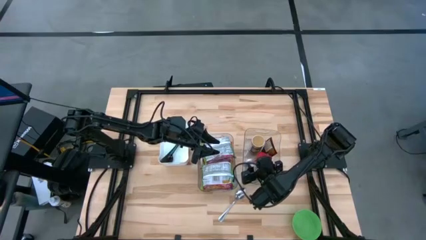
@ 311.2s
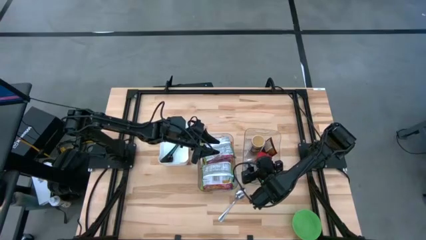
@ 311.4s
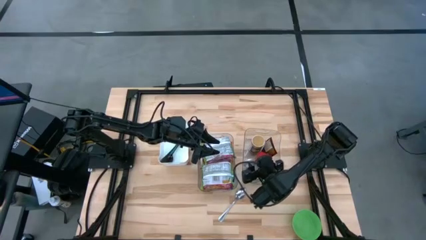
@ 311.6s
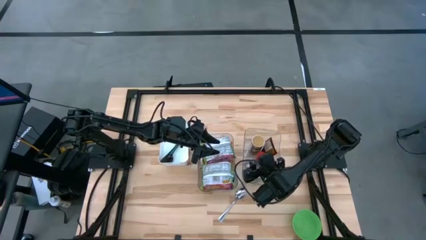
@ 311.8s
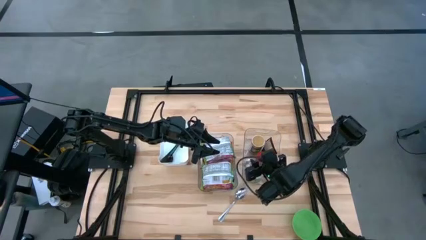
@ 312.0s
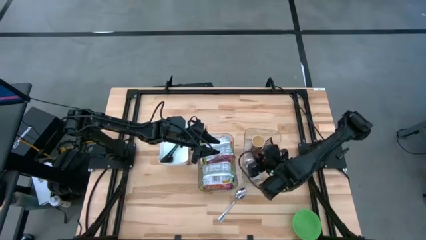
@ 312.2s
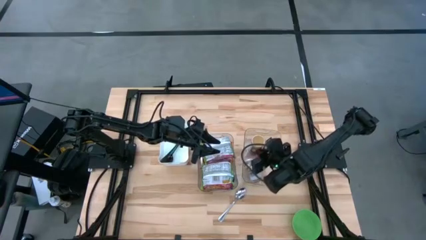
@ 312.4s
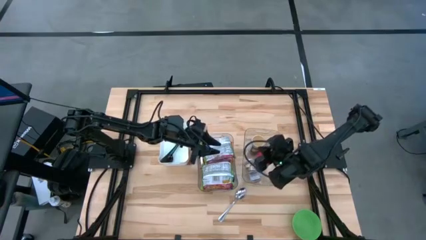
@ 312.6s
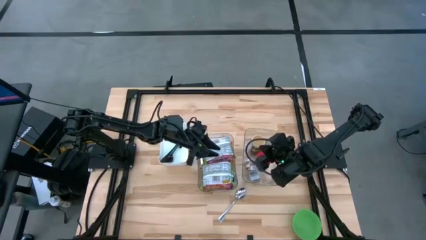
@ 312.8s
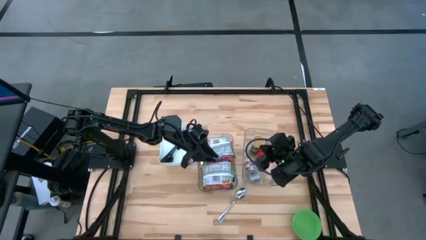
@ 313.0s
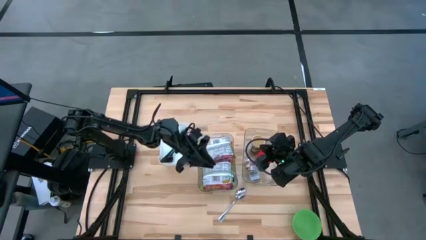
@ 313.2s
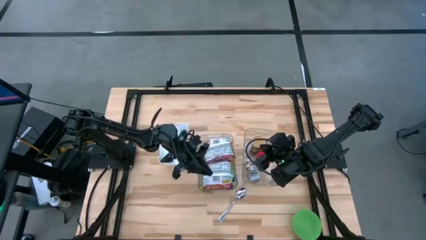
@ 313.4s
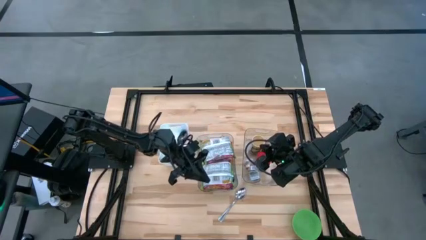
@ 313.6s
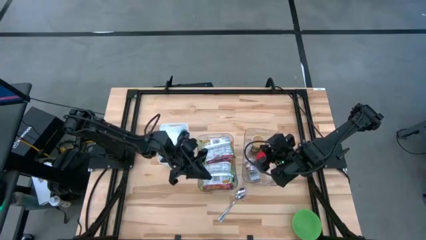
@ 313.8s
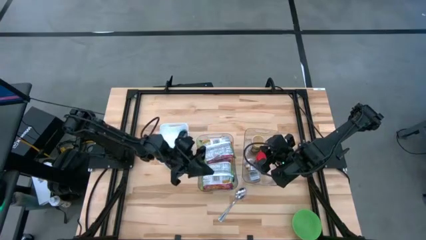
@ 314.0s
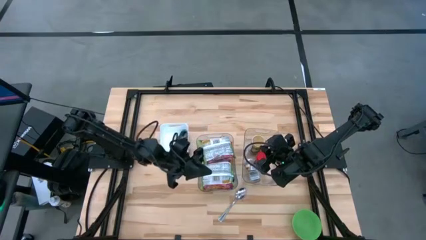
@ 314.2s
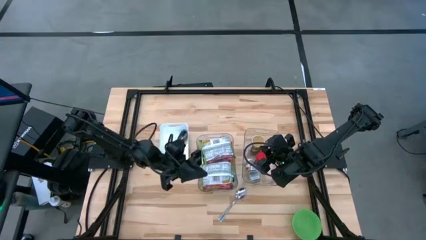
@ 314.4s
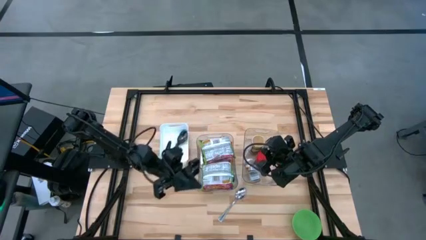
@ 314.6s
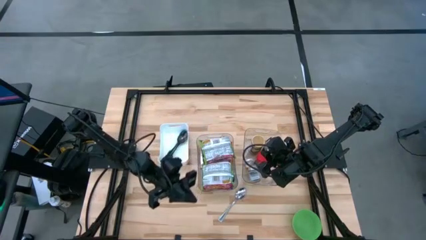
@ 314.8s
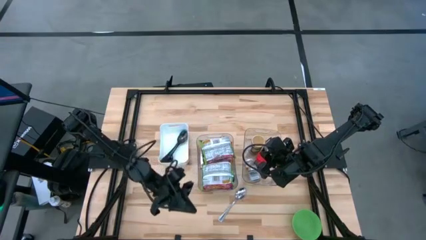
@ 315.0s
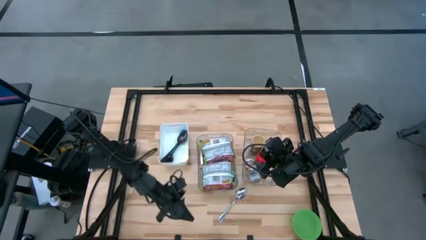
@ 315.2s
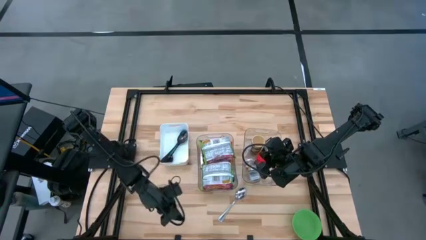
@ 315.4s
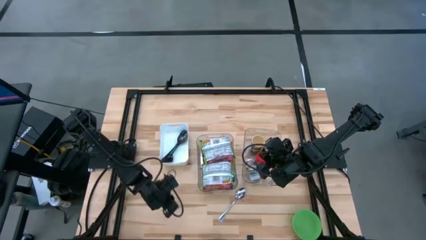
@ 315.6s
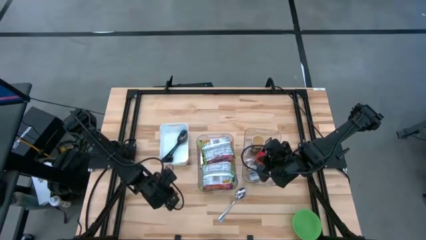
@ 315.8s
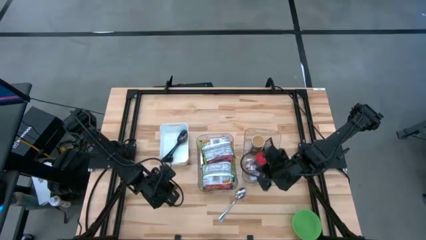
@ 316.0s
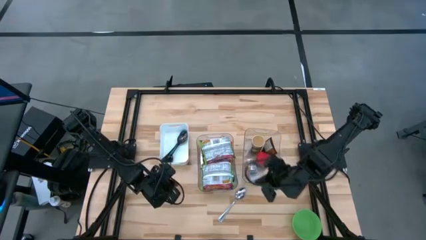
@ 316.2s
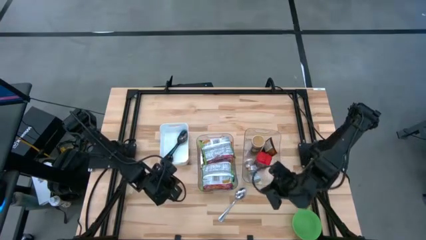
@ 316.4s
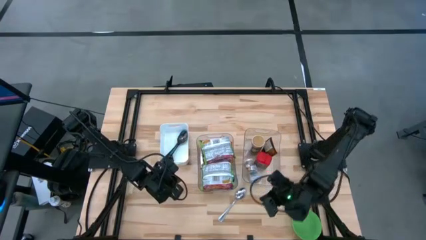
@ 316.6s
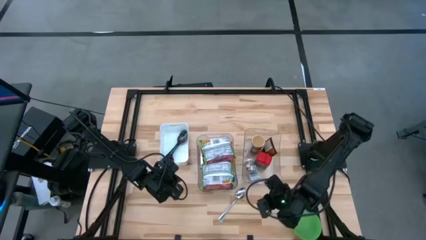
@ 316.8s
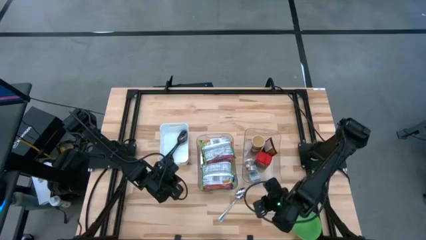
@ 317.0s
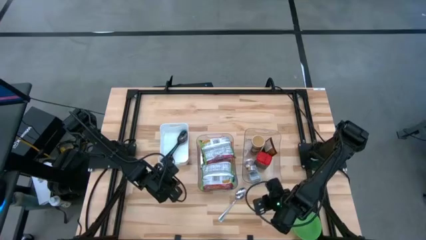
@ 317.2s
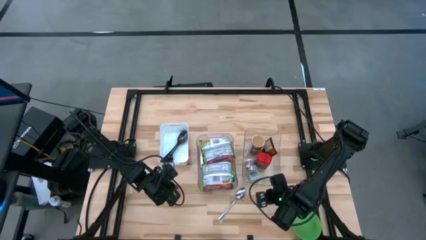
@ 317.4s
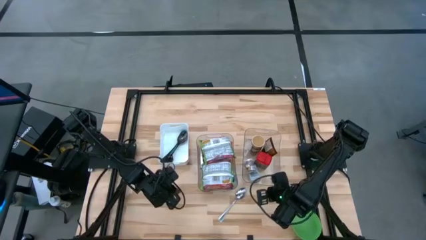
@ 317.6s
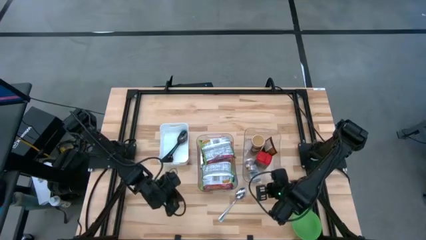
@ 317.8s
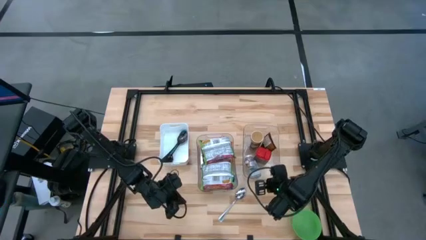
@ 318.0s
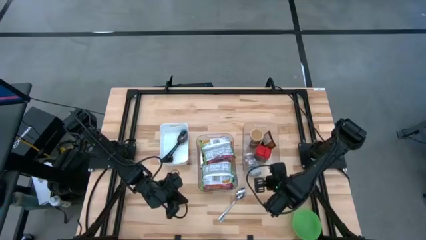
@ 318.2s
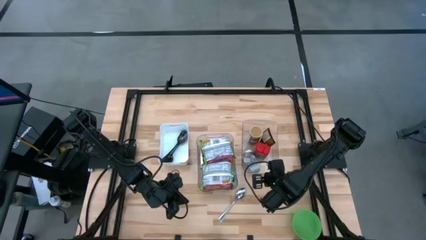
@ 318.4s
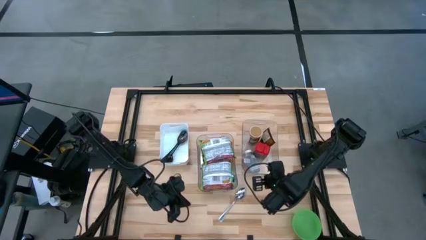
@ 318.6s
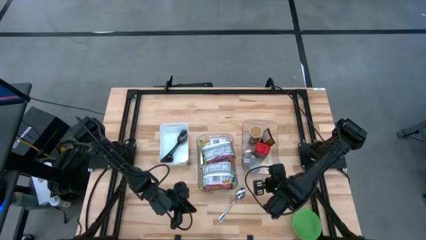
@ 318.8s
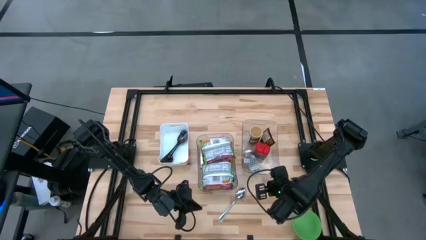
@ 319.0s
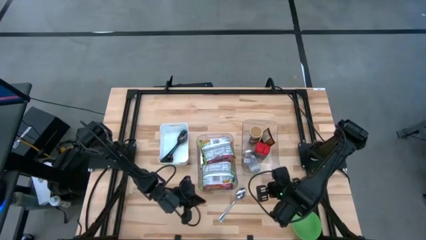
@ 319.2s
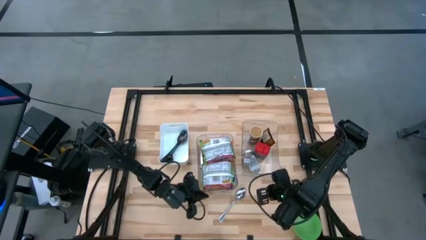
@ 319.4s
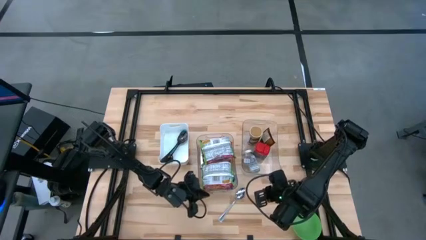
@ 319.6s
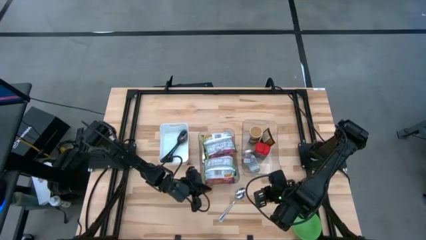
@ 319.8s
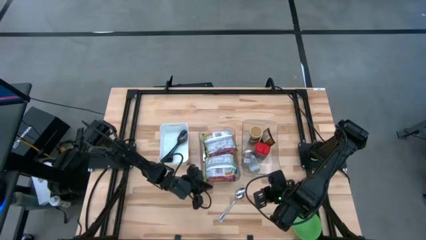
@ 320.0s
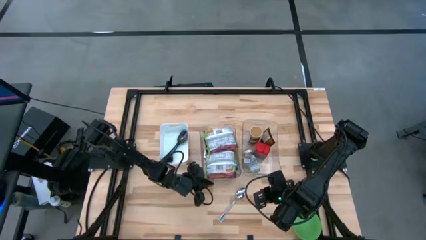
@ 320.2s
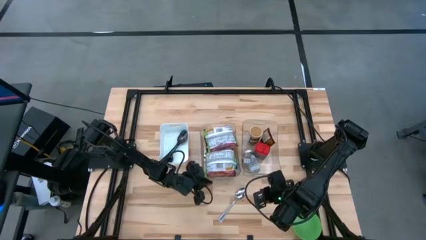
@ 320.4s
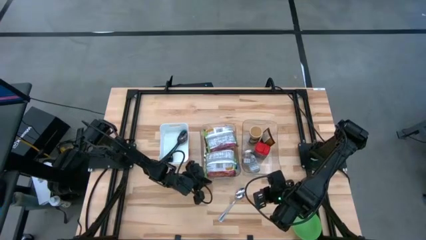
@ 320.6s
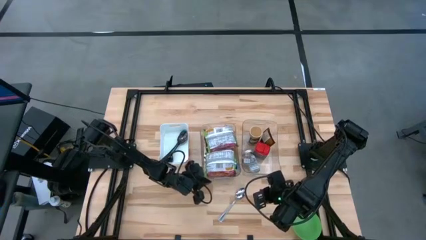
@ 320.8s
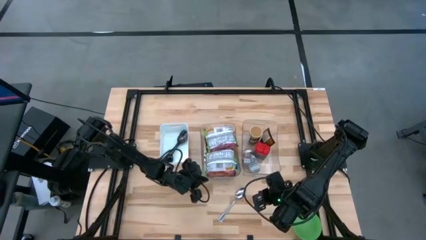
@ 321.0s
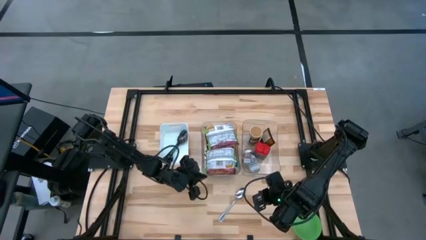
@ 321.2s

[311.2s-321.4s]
Task: Pick & Place Food Item
Adjust the left transparent bin on the table
